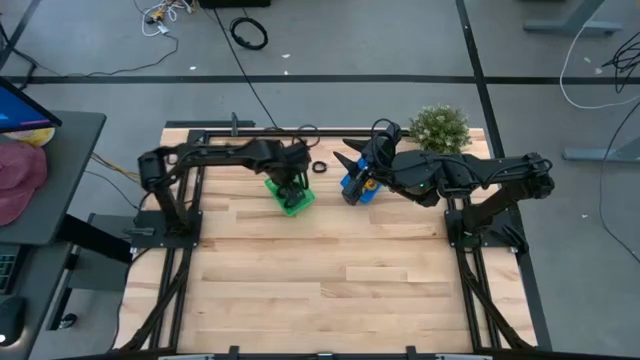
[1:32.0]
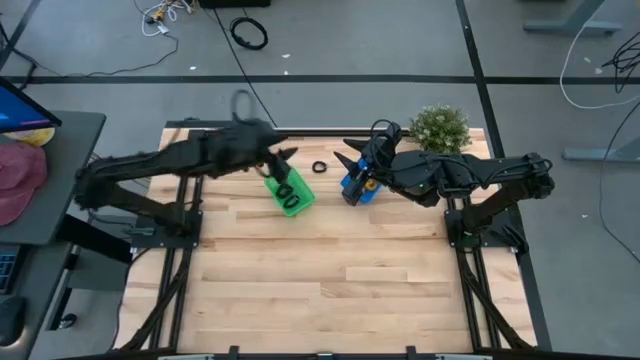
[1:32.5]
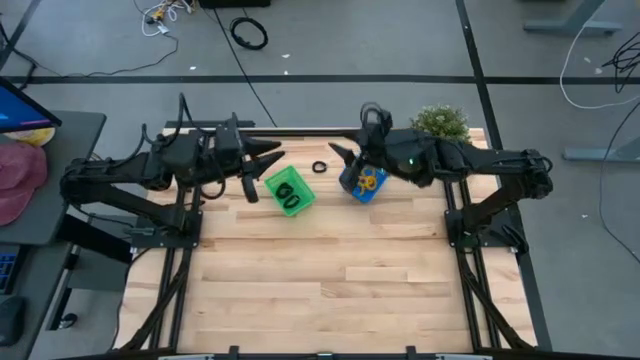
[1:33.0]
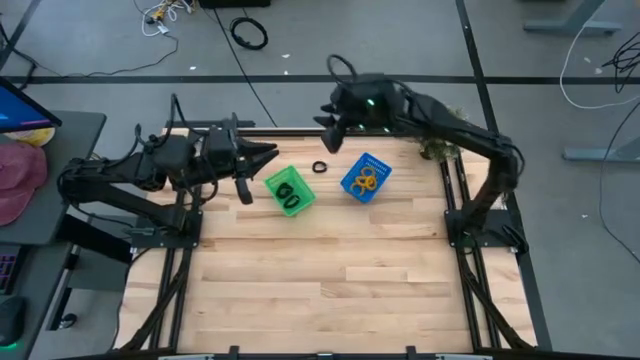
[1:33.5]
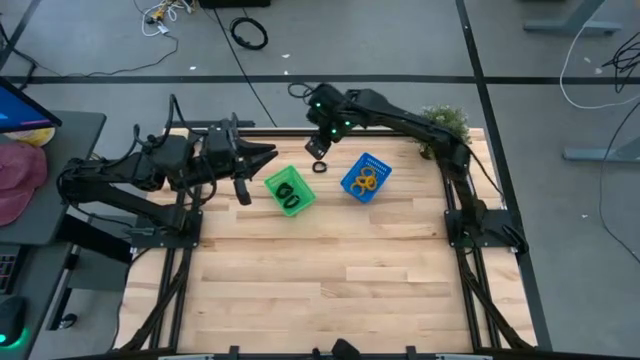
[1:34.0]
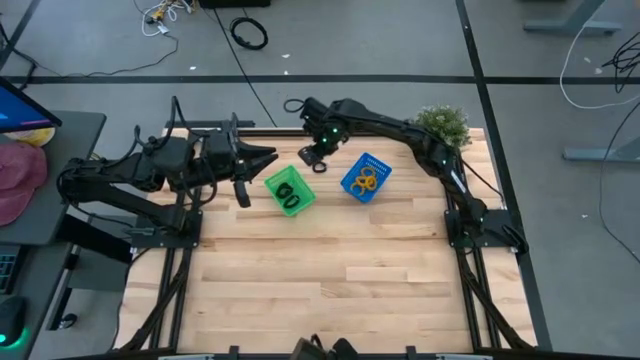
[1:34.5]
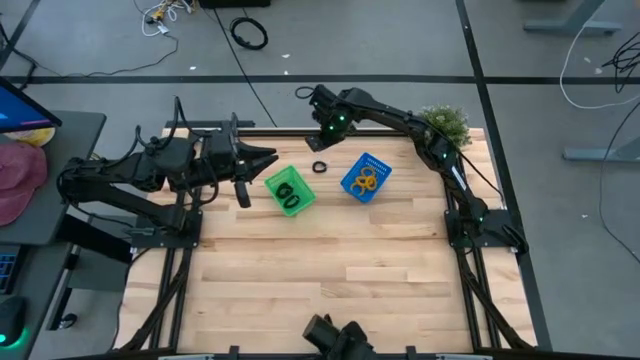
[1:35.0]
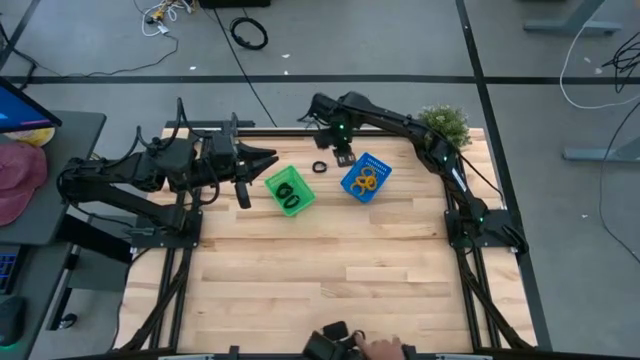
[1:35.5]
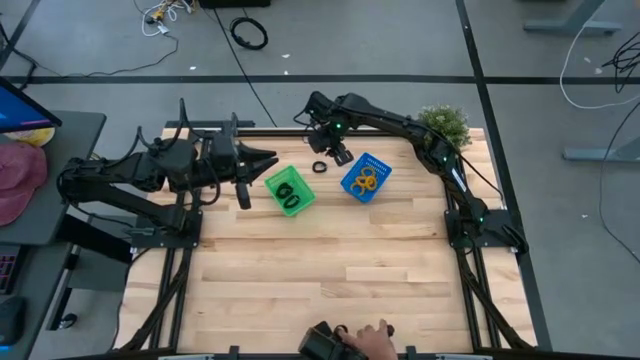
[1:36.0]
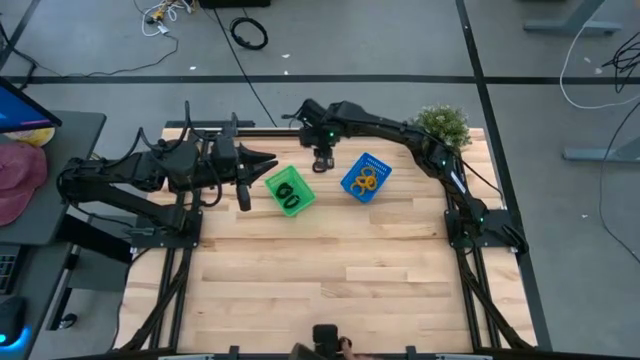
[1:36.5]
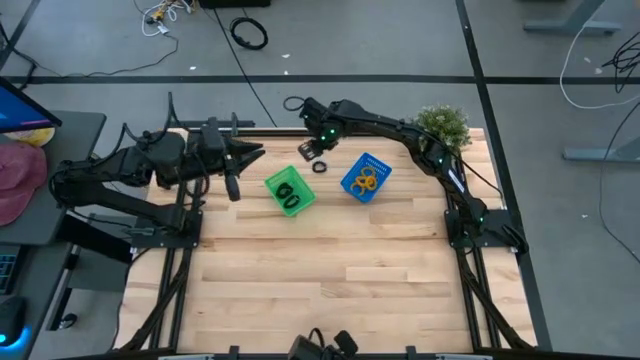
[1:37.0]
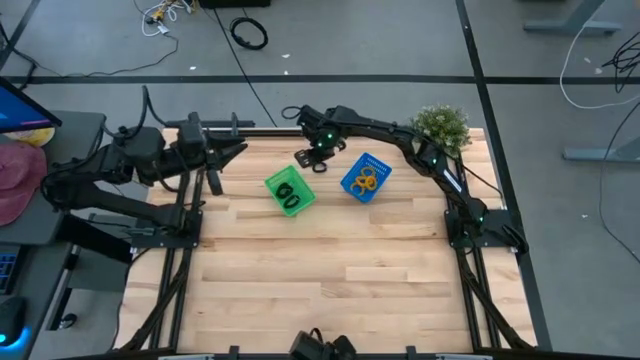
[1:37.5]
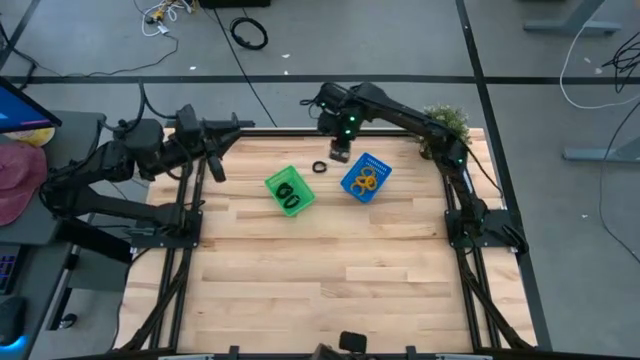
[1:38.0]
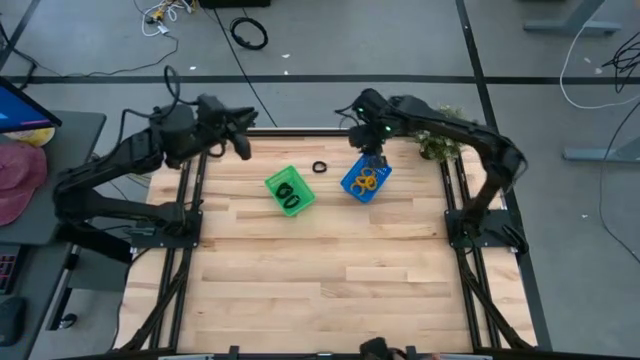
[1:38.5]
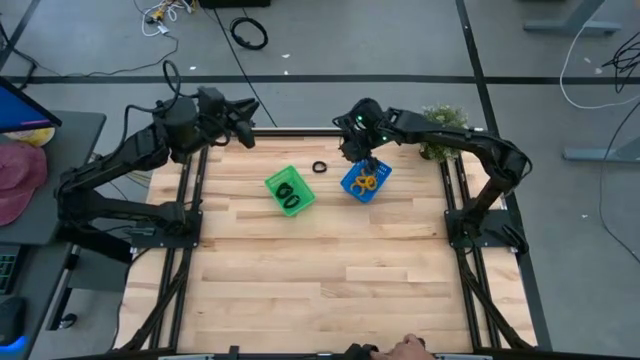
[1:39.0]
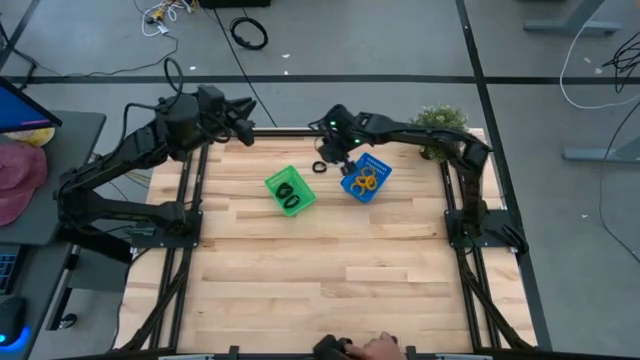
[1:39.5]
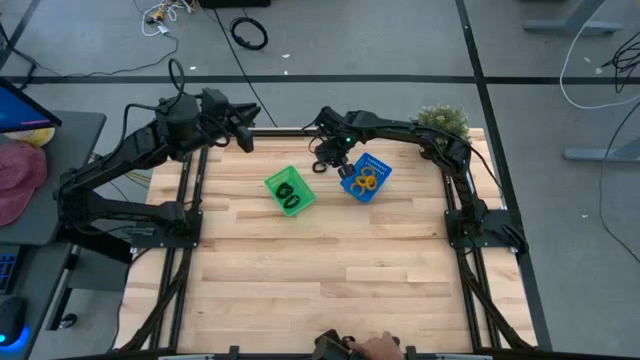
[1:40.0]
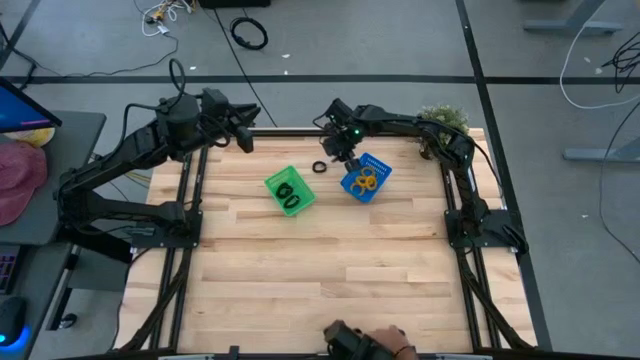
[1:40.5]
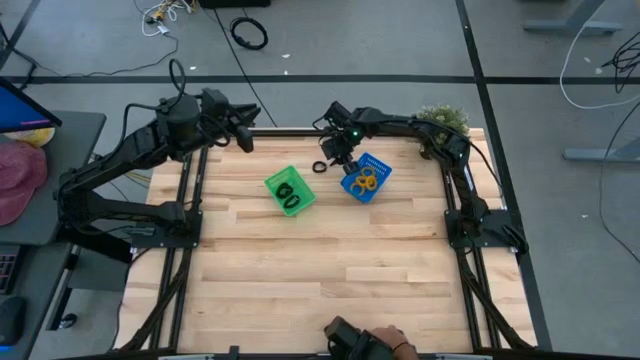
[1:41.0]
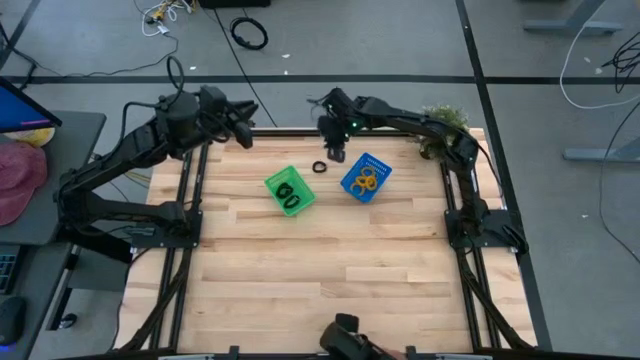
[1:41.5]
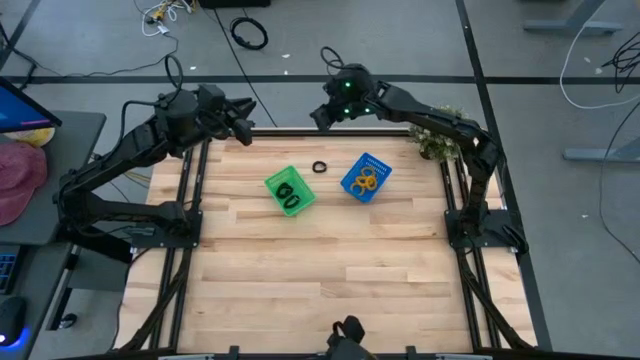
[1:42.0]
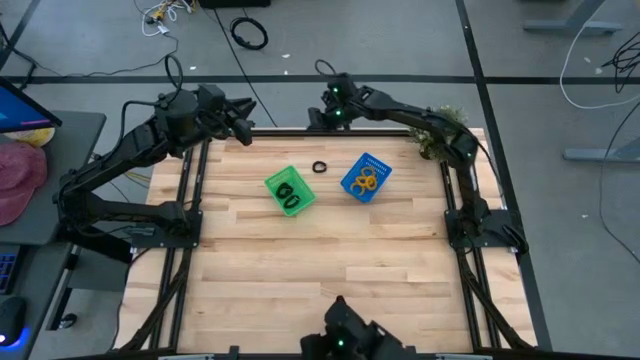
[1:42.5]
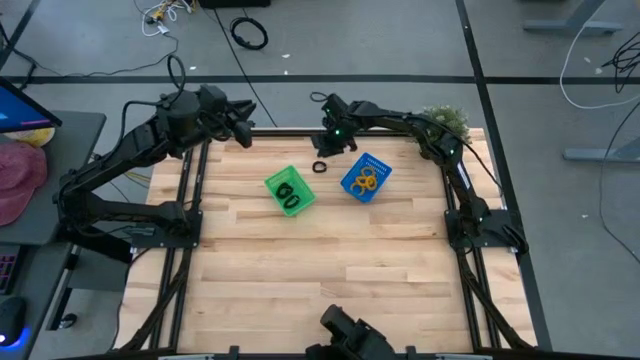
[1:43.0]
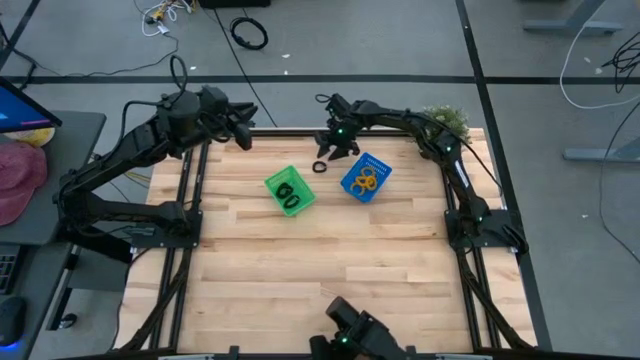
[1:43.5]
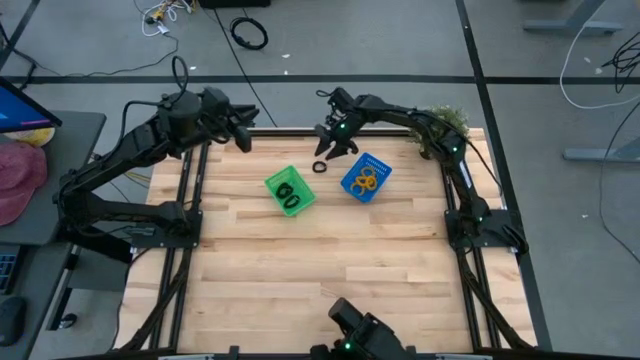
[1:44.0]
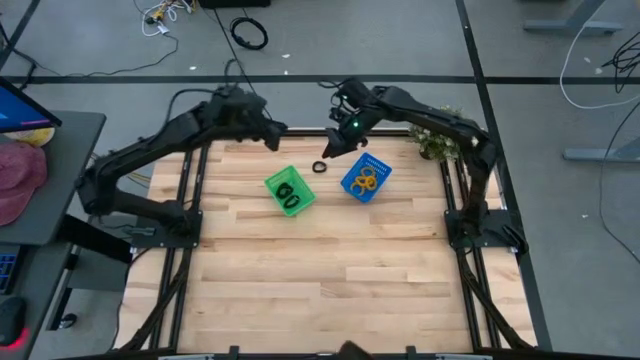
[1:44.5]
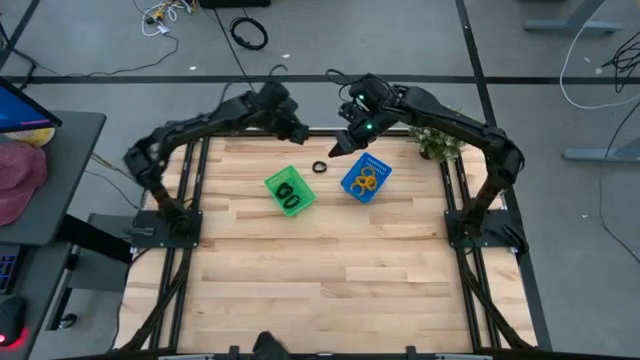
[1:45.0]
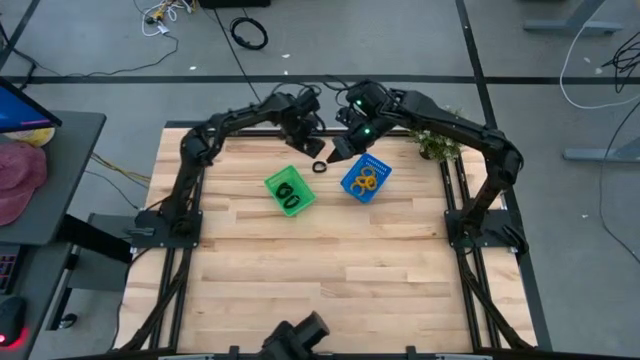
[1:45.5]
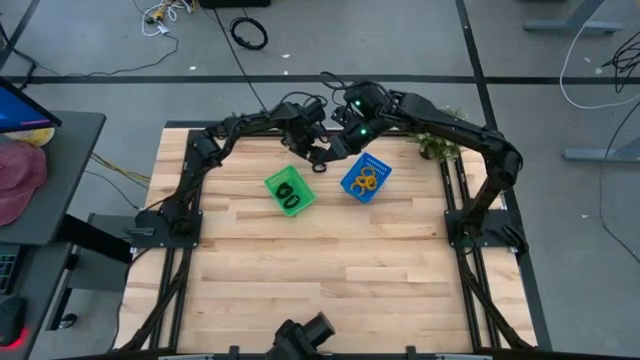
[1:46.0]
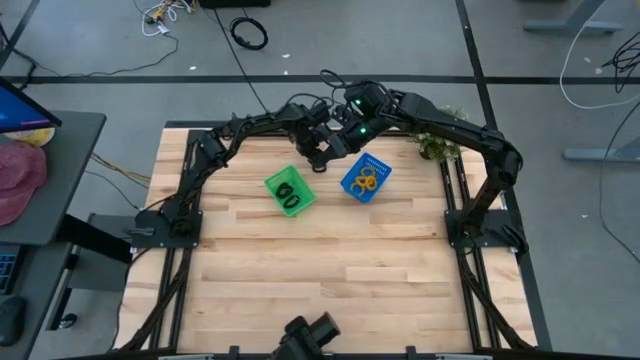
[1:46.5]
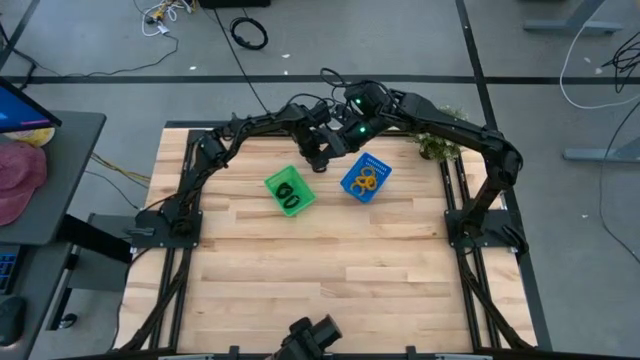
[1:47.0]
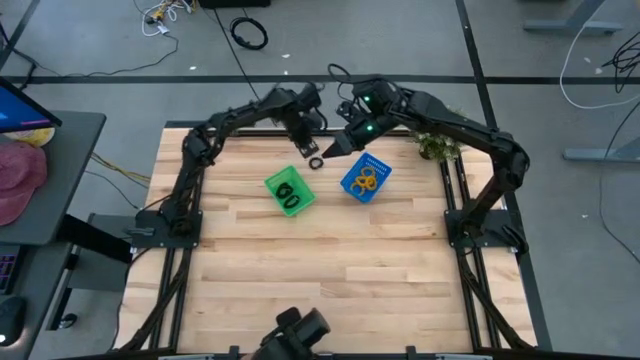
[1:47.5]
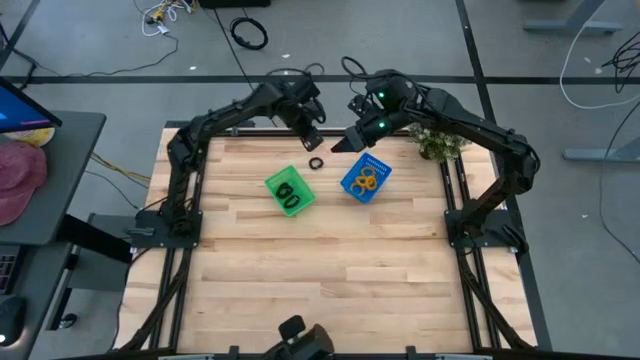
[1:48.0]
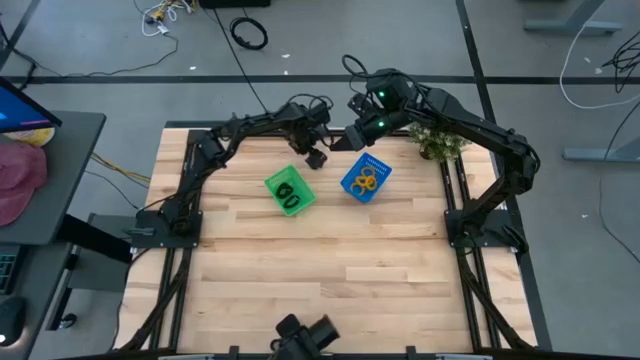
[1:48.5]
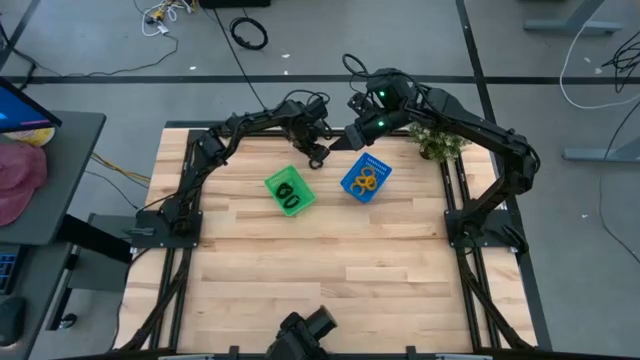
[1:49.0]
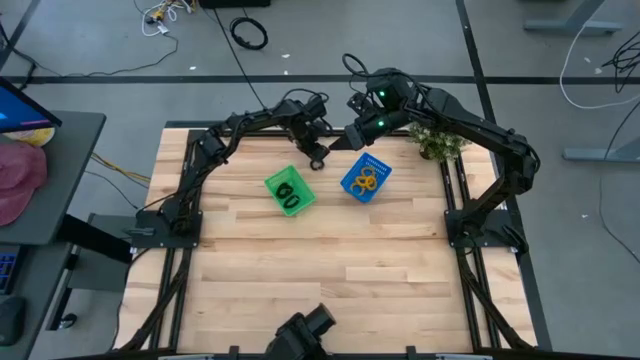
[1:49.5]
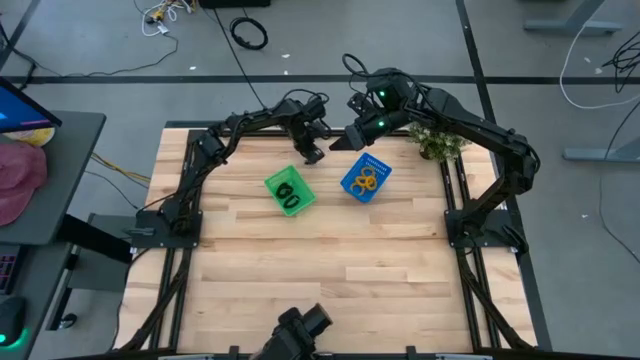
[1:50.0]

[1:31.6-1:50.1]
Task: Sort spring keychains
Put the black spring keychain into the green bin

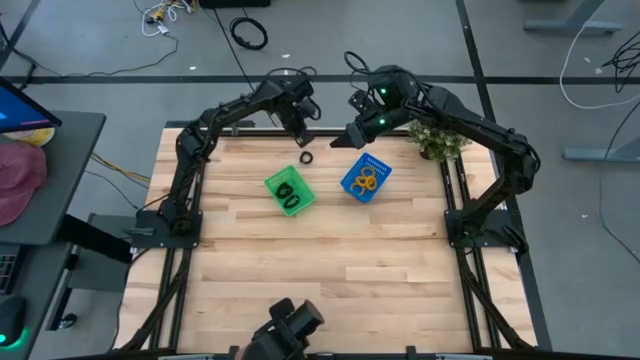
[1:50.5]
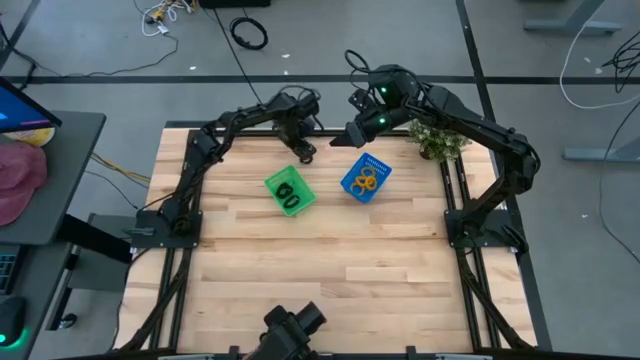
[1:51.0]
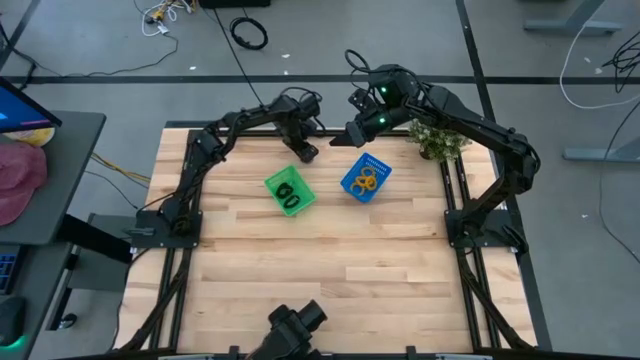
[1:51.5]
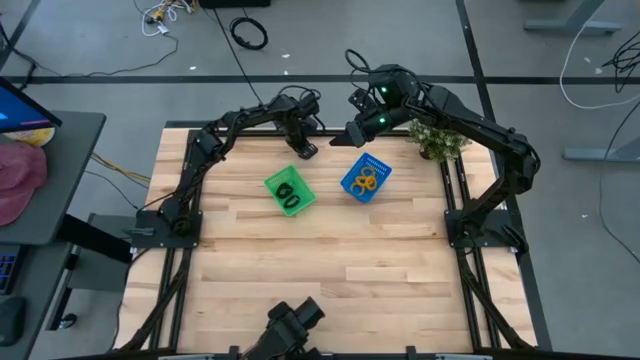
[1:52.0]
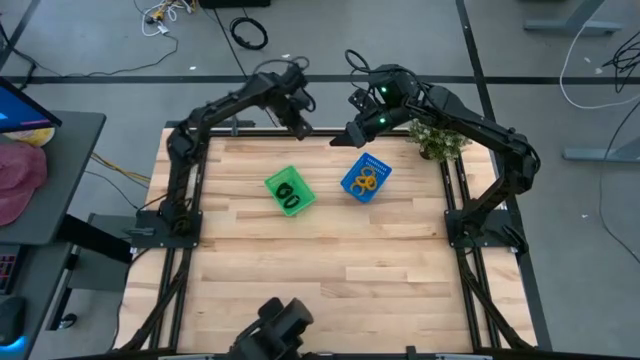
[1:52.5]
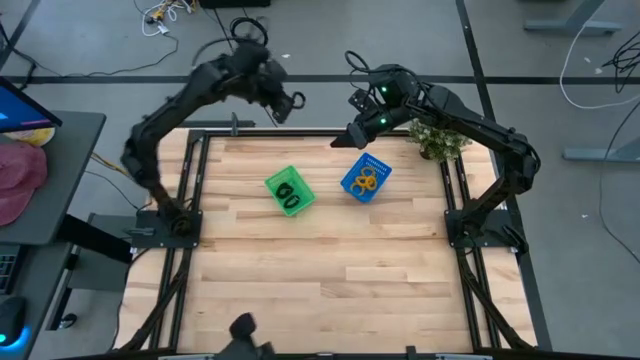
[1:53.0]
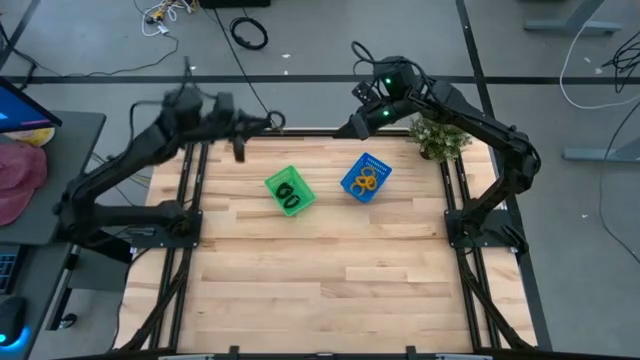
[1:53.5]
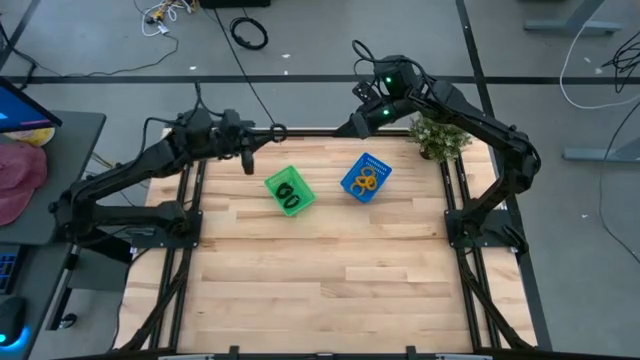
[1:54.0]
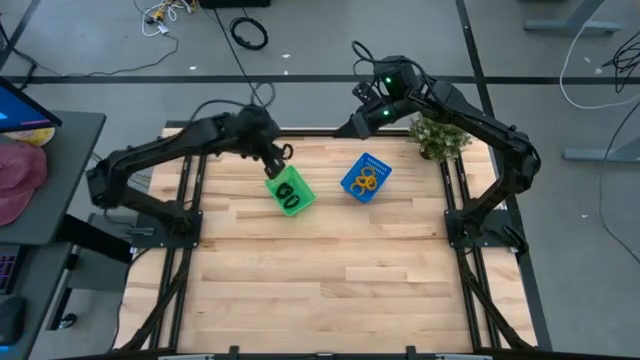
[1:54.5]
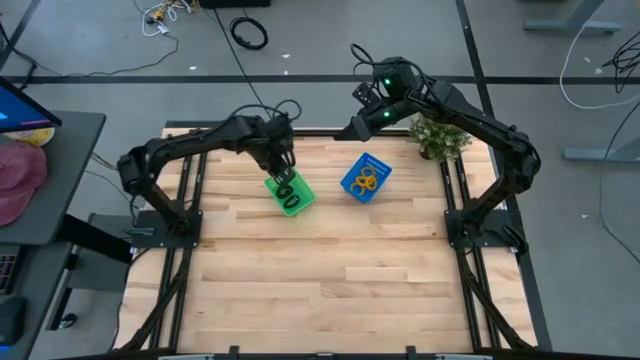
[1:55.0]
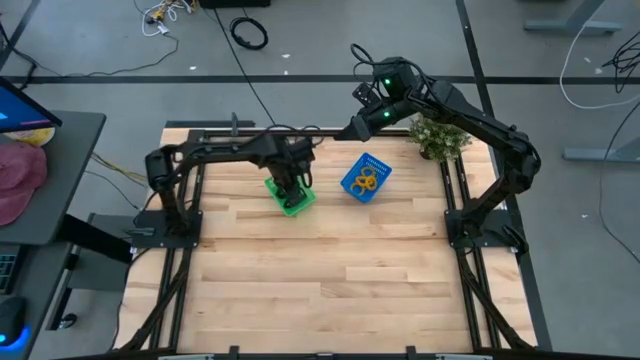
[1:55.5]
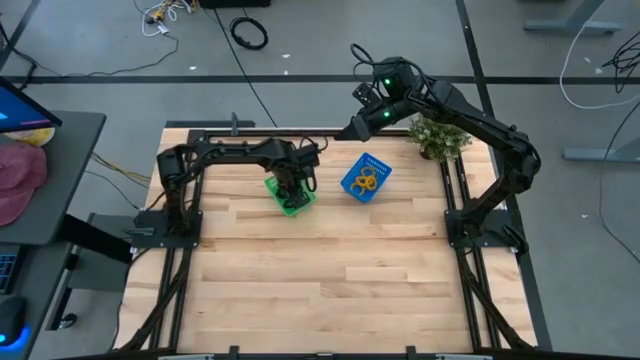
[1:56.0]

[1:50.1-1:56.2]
Put the black spring keychain into the green bin
